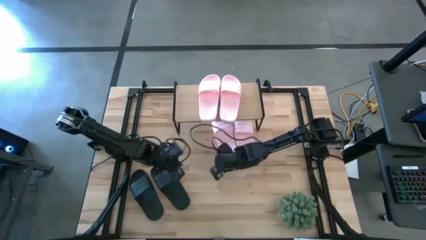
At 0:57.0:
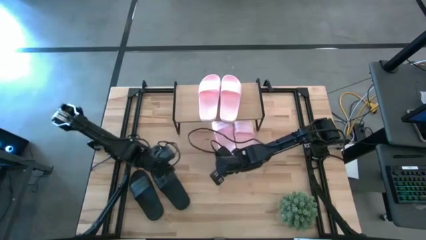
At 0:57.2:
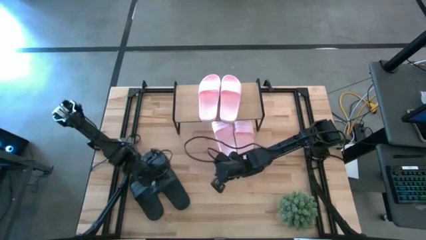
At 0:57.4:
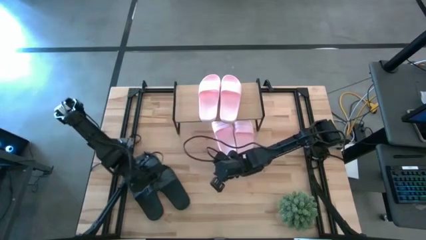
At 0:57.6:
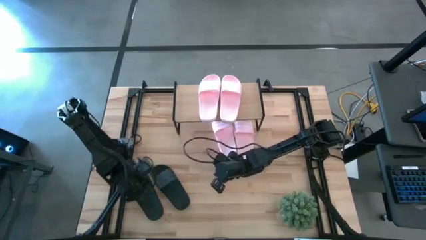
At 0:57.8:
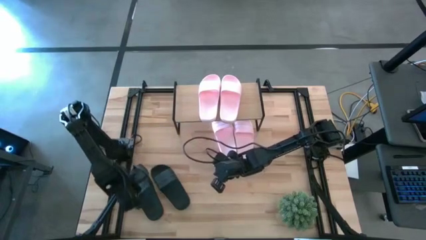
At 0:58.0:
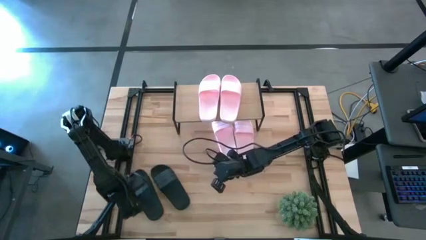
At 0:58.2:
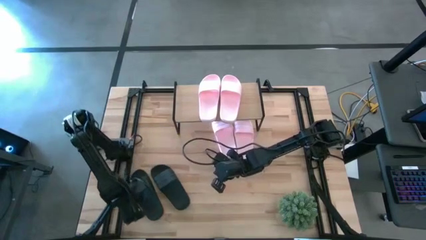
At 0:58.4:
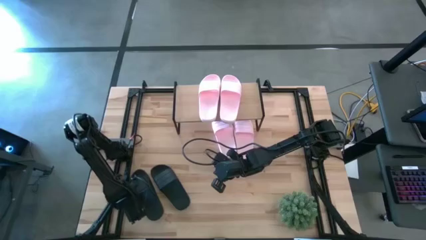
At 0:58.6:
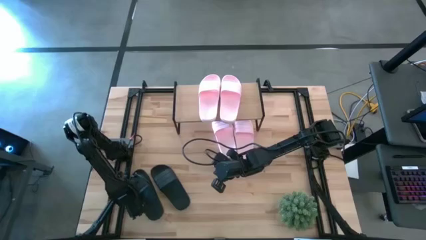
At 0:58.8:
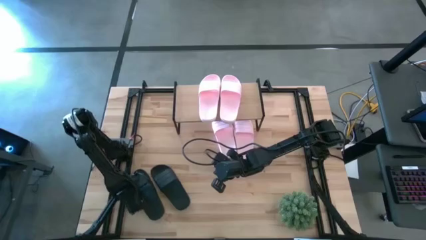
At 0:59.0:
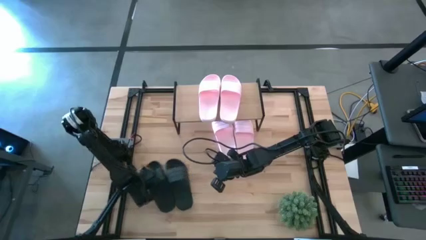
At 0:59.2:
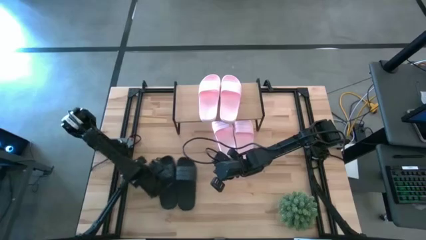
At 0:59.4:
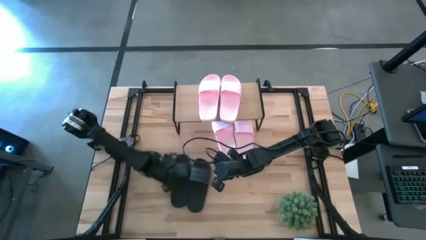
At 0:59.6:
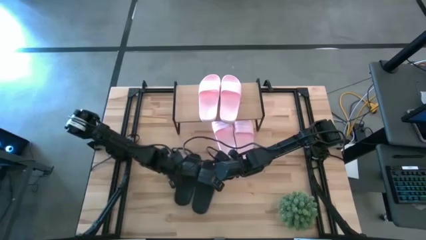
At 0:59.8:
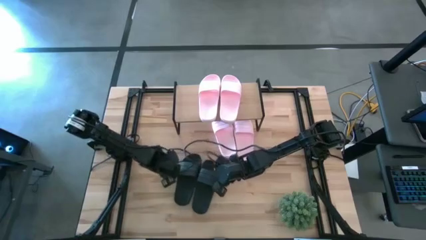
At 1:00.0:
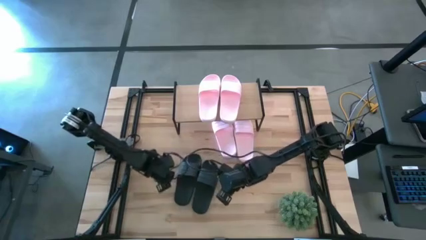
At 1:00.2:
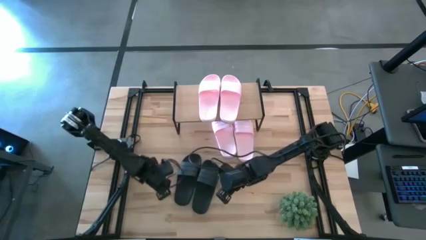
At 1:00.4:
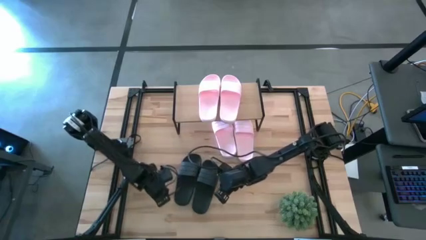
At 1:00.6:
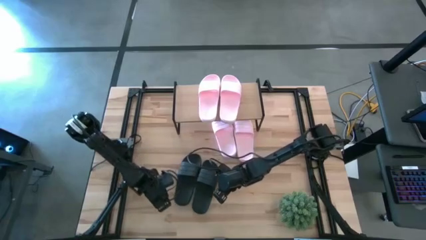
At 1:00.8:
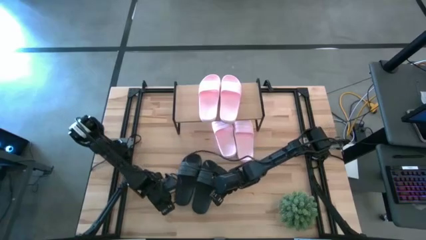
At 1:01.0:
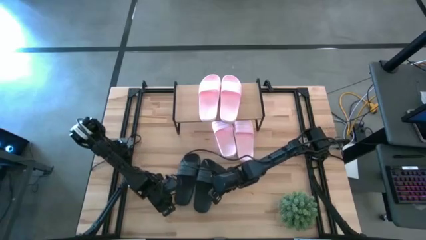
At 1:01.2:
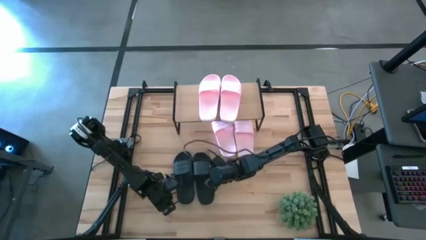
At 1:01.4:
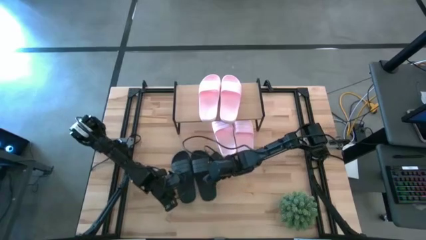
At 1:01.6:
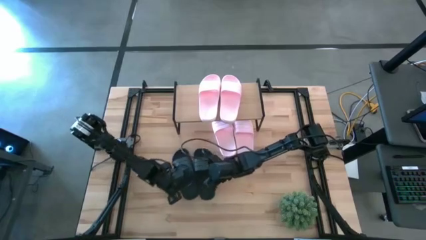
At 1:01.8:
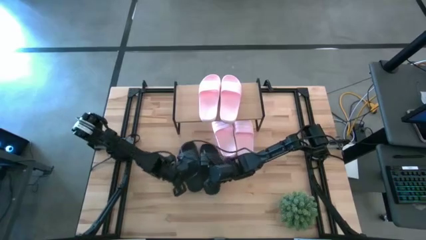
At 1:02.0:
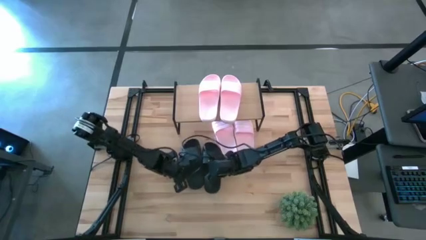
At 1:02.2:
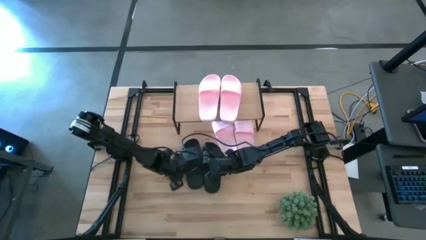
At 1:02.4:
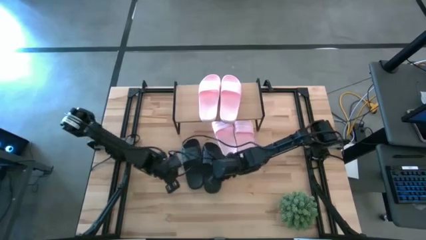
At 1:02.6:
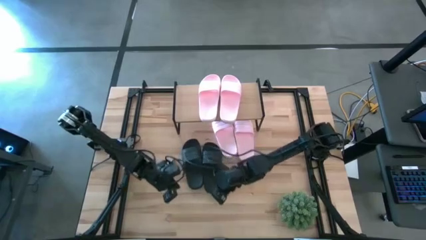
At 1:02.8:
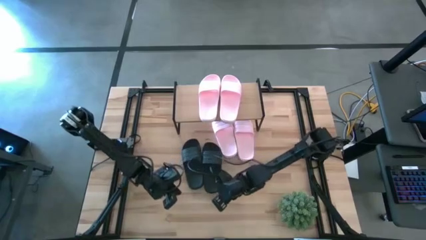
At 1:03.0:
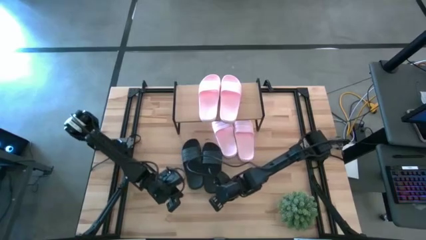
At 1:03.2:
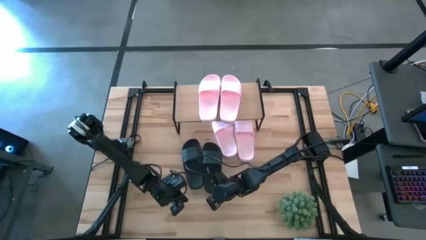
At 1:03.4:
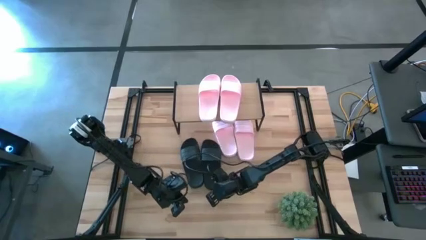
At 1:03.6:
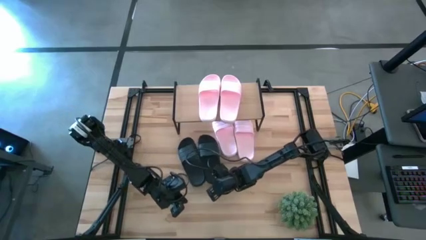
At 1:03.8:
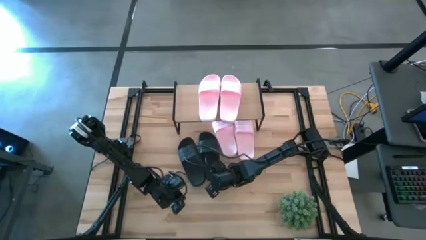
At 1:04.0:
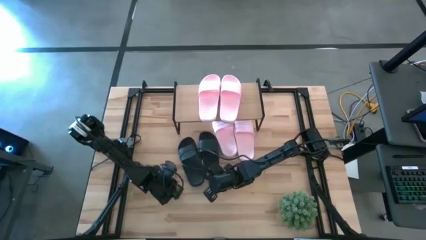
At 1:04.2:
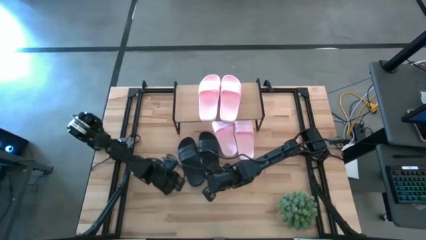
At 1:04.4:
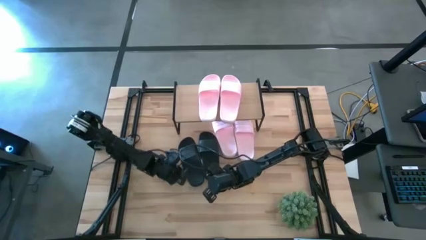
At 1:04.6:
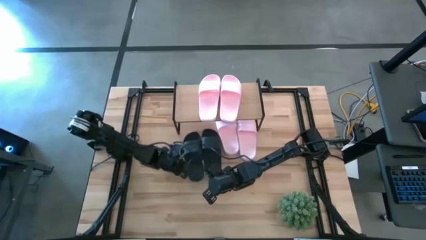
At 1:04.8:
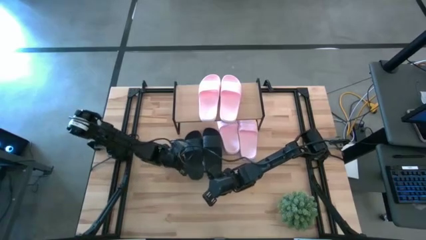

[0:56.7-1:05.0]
Task: Pick and place slides into the shelf
Move the black slides to the center of the table

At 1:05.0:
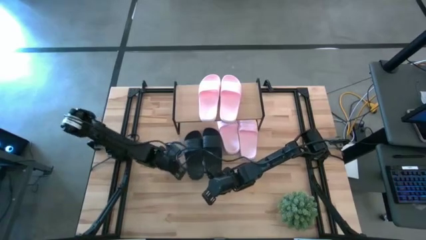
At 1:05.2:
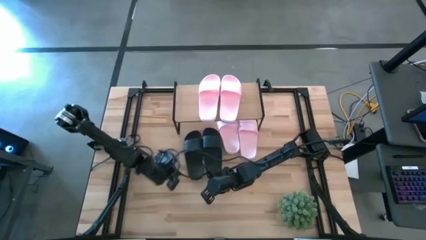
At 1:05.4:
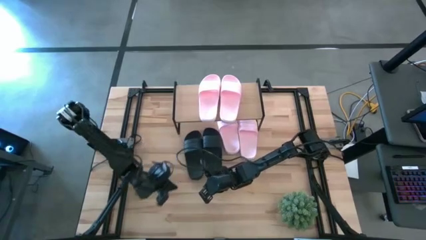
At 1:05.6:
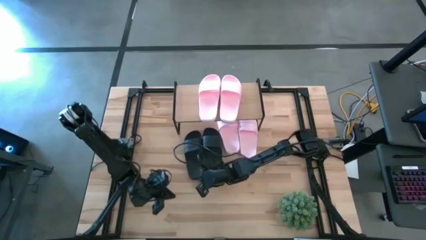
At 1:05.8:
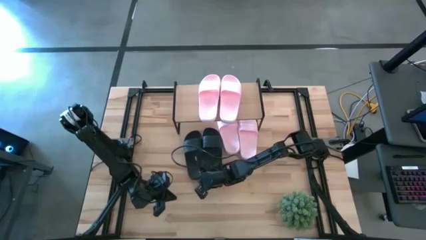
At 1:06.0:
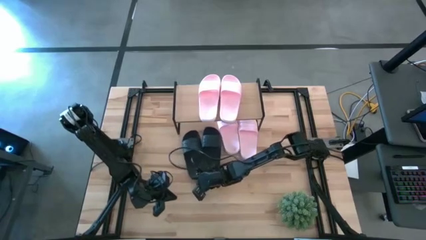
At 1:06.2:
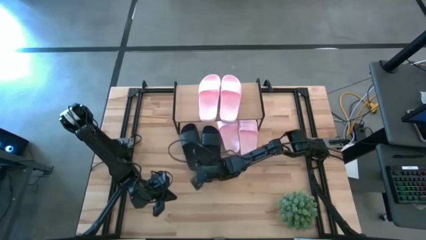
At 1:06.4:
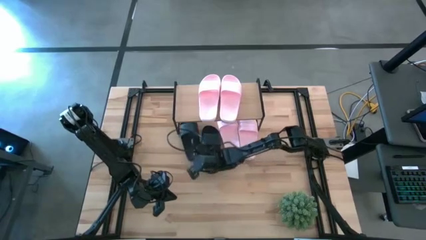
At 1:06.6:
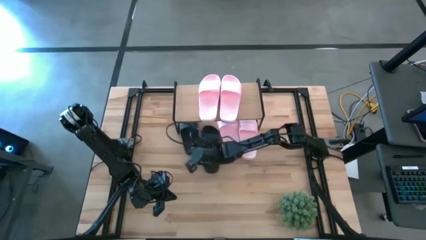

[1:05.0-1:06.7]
Put the black slide under the shelf

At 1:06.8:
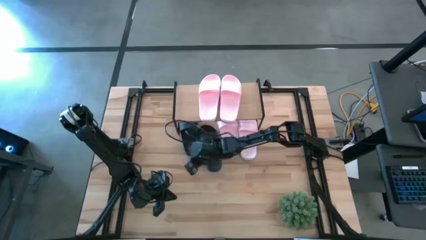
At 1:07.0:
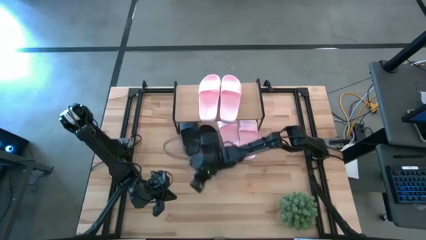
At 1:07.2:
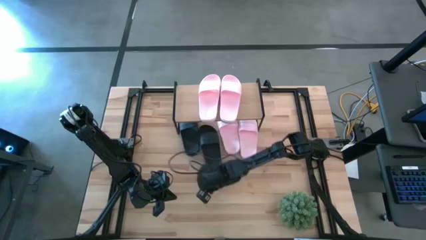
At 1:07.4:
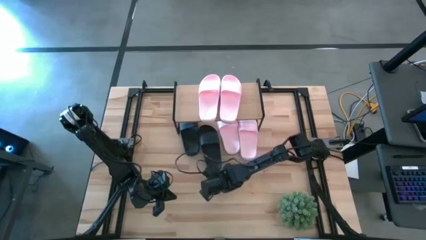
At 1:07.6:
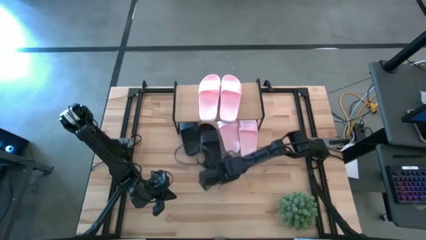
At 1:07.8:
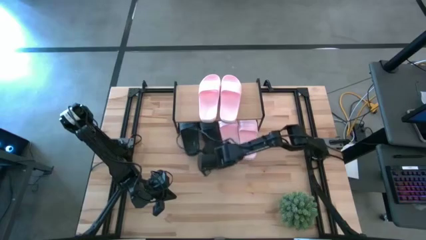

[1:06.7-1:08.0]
Put the black slide under the shelf

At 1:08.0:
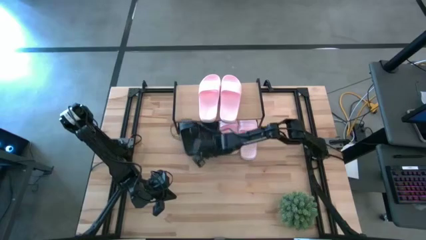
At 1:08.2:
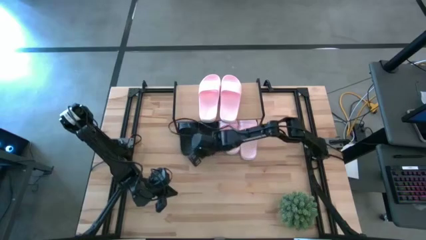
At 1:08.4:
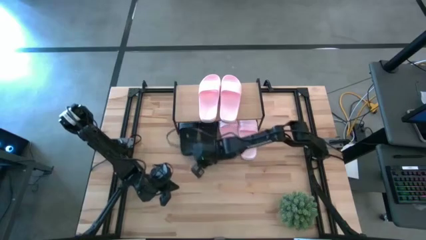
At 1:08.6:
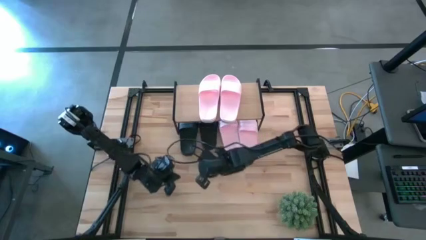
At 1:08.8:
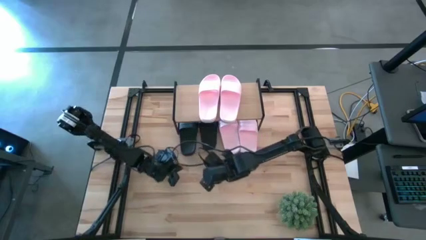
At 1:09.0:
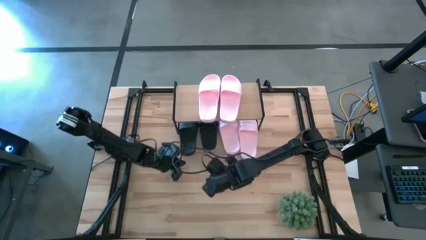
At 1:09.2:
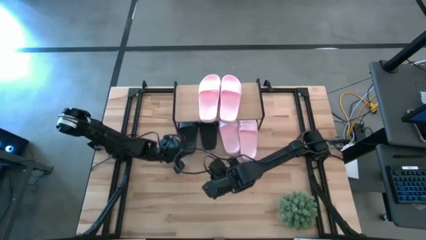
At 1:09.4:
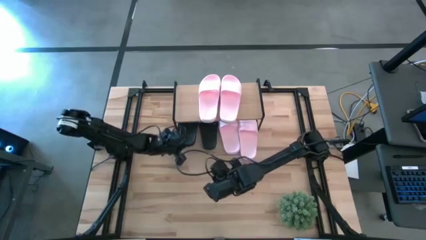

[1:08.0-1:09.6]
Adjust the black slide under the shelf

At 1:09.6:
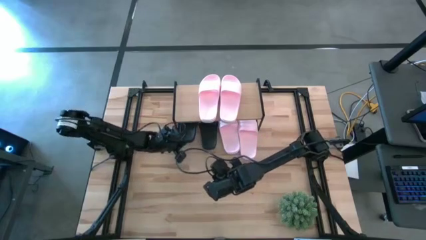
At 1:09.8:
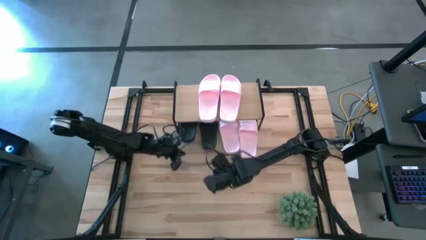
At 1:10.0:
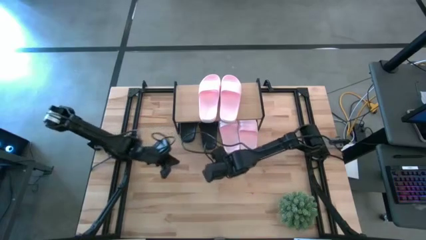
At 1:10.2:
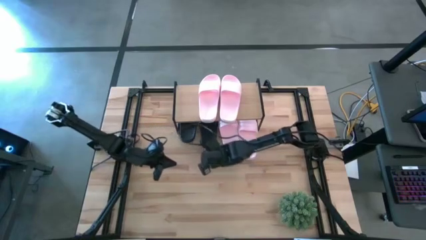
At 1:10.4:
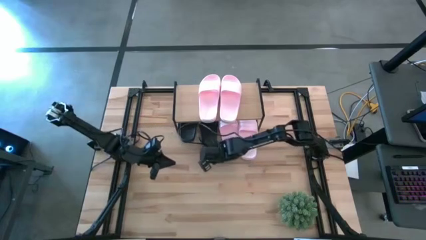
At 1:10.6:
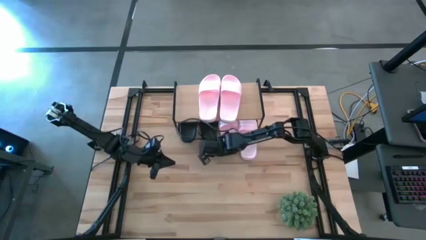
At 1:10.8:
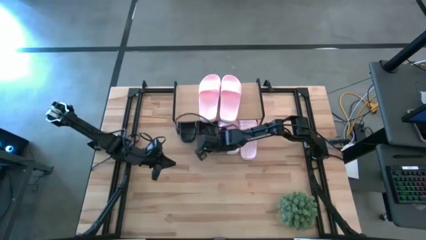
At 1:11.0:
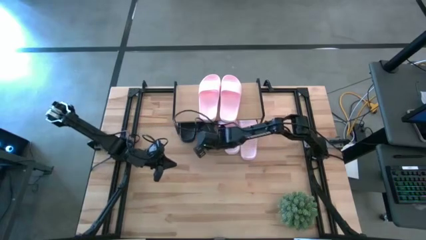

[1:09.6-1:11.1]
Adjust the black slide under the shelf

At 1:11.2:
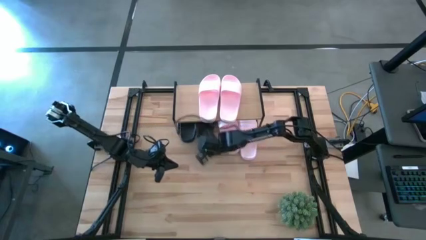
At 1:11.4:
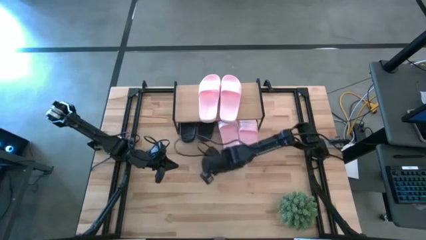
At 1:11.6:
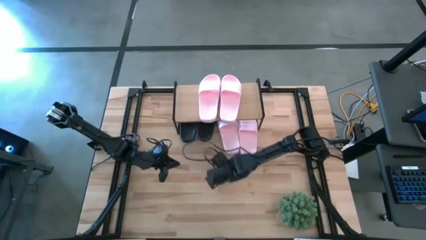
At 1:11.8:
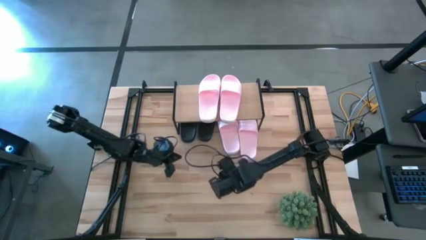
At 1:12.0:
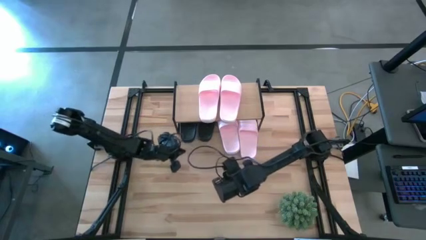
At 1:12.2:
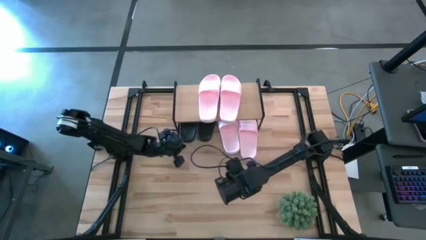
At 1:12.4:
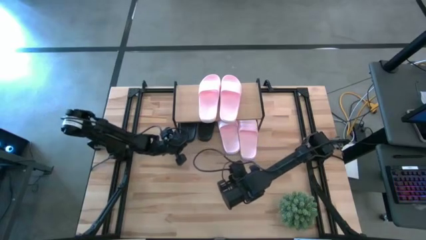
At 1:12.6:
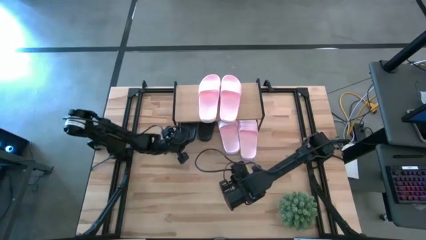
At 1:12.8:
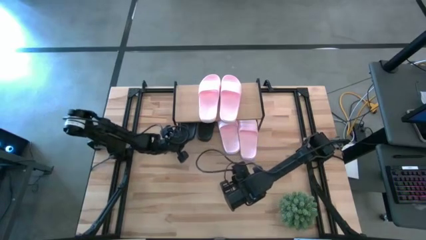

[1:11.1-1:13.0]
Adjust the black slide under the shelf

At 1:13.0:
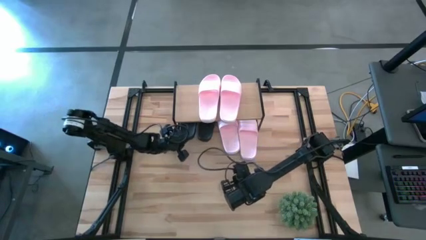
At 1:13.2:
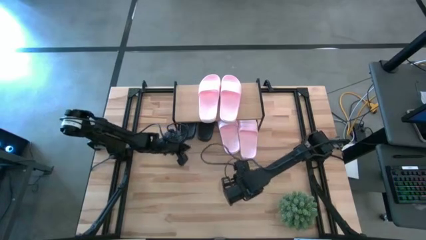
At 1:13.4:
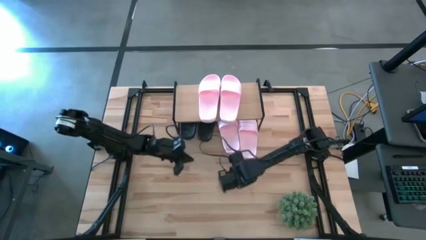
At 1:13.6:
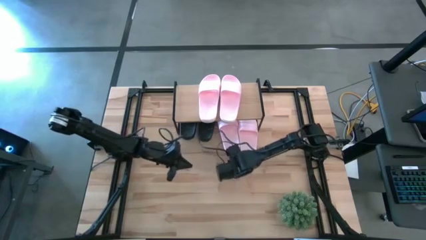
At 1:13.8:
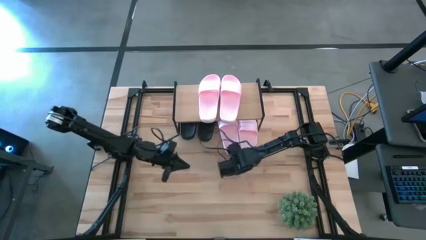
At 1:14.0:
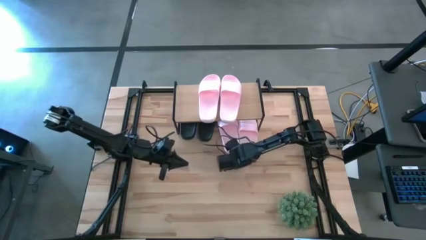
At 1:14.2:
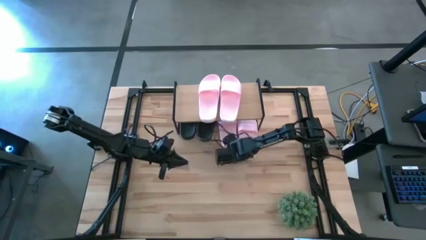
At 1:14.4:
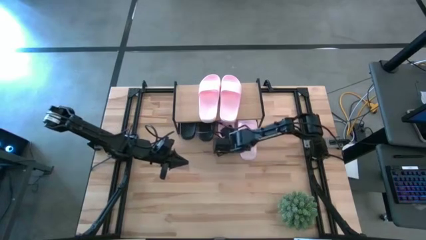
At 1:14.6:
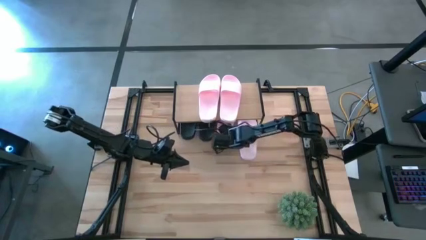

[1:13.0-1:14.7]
Adjust the pink slide under the shelf
